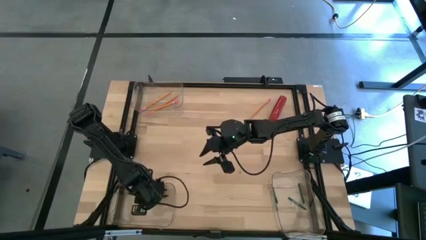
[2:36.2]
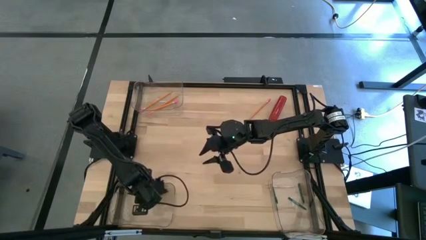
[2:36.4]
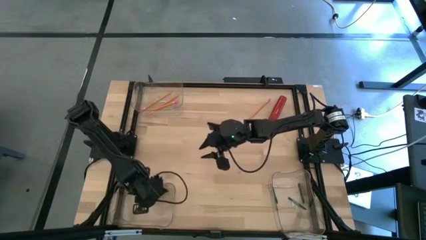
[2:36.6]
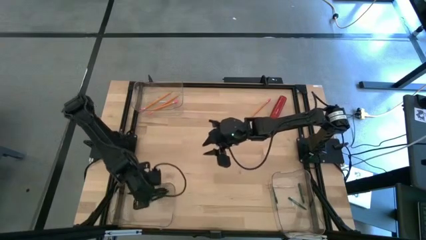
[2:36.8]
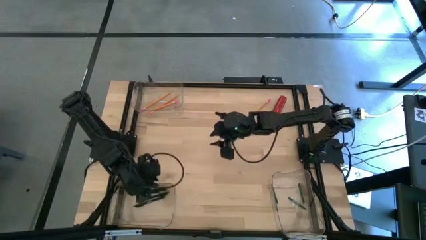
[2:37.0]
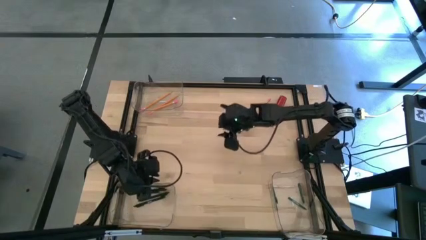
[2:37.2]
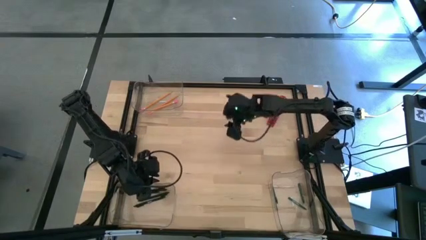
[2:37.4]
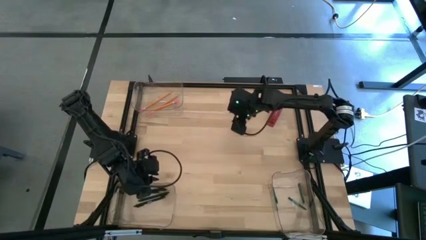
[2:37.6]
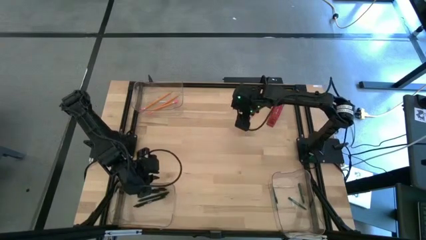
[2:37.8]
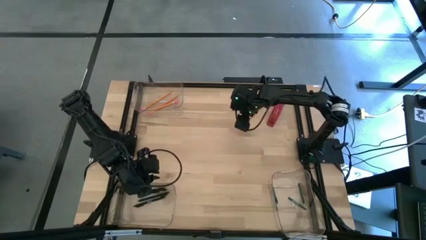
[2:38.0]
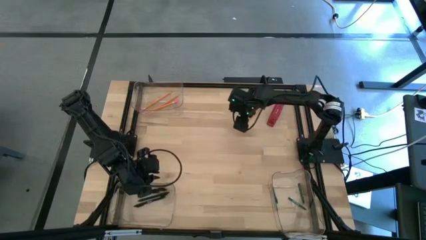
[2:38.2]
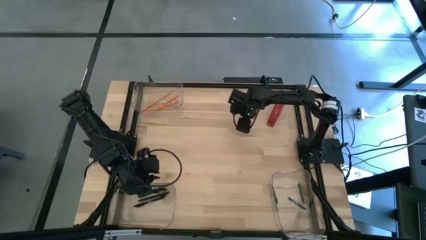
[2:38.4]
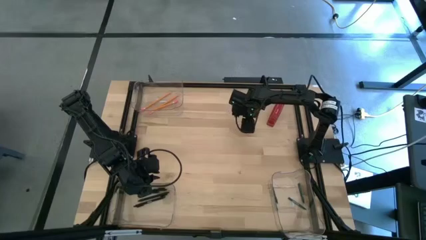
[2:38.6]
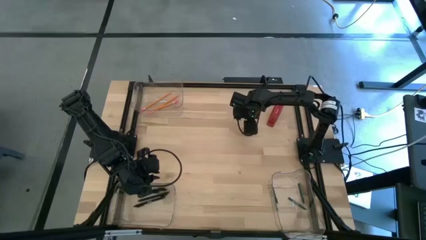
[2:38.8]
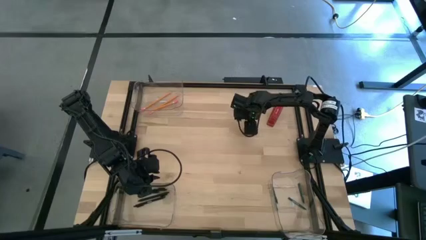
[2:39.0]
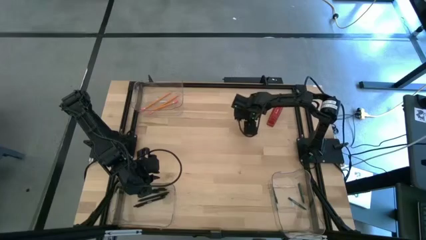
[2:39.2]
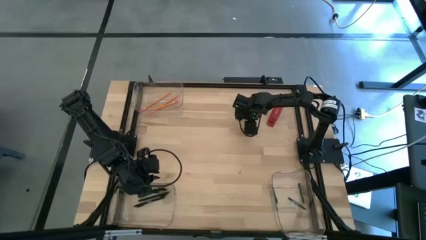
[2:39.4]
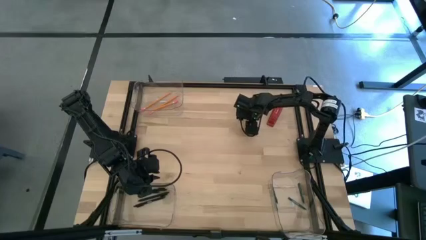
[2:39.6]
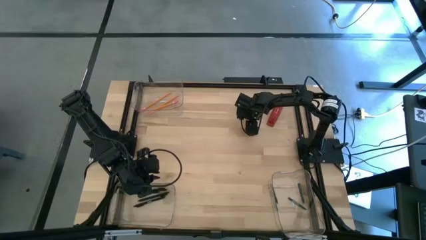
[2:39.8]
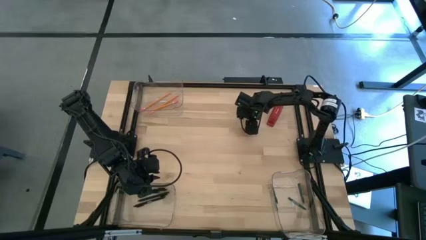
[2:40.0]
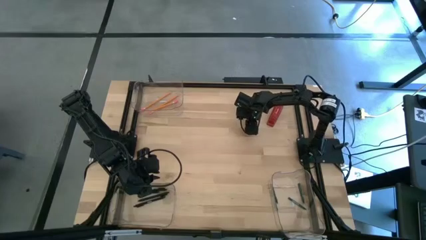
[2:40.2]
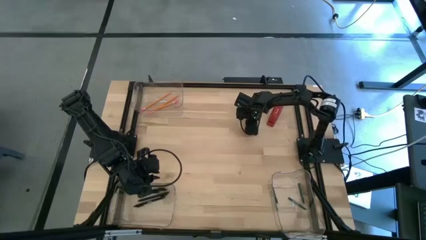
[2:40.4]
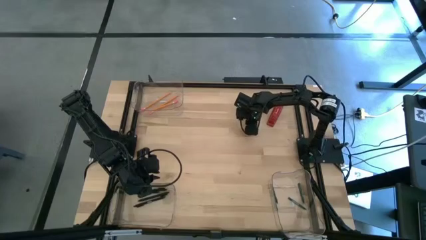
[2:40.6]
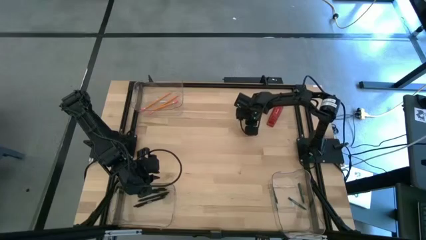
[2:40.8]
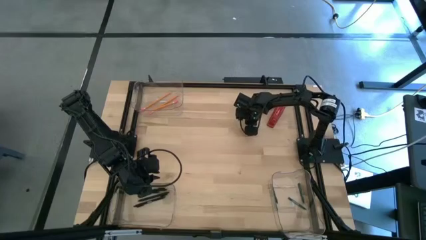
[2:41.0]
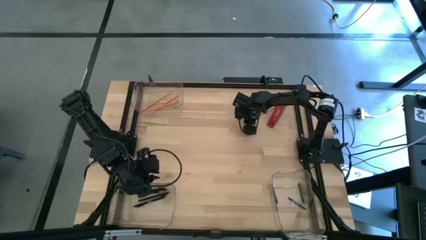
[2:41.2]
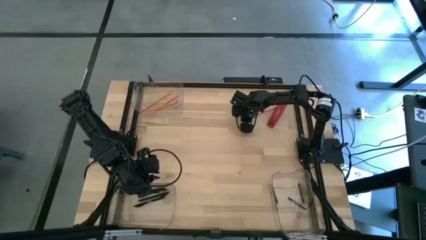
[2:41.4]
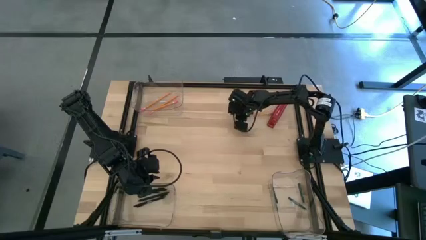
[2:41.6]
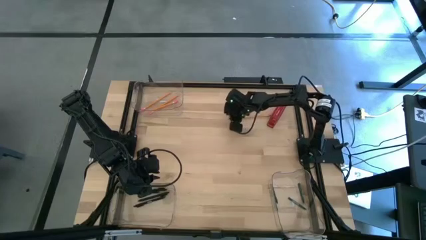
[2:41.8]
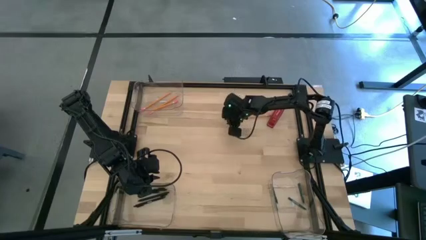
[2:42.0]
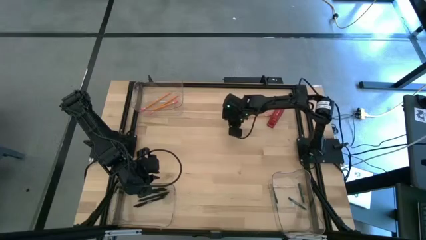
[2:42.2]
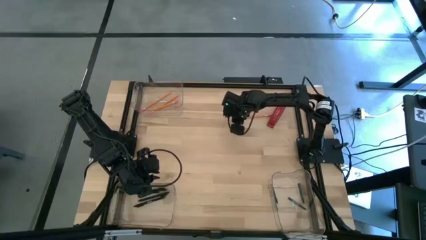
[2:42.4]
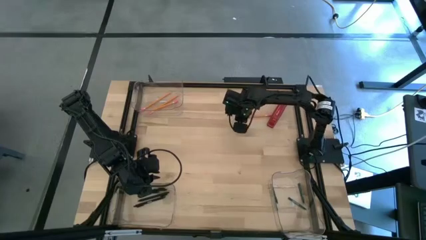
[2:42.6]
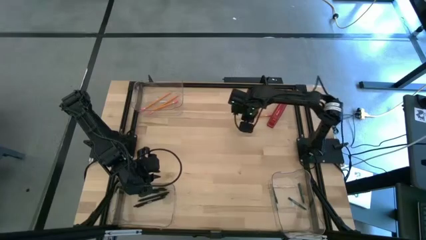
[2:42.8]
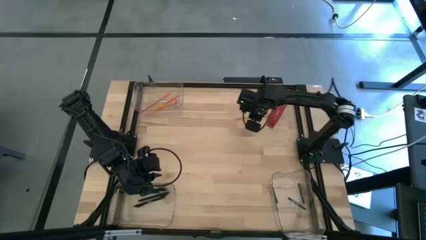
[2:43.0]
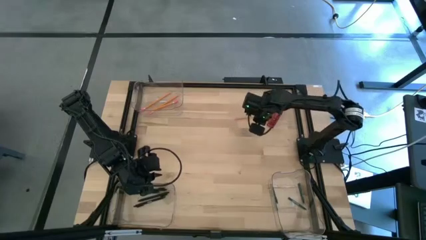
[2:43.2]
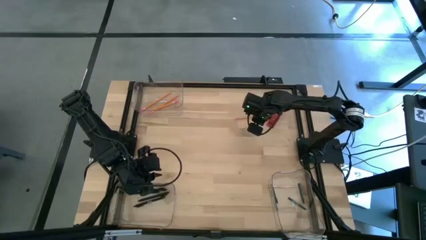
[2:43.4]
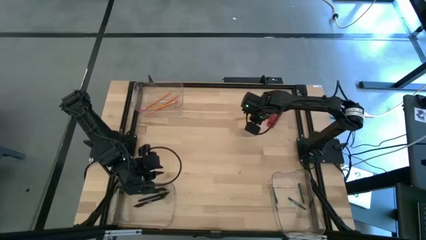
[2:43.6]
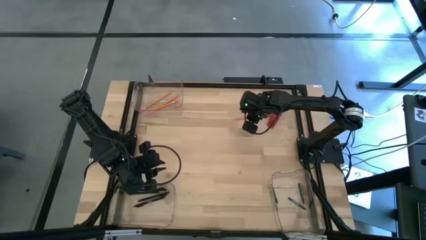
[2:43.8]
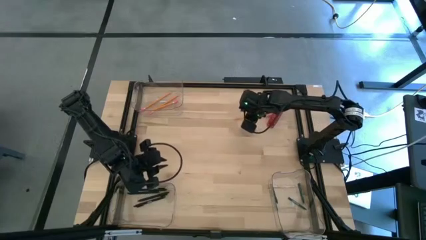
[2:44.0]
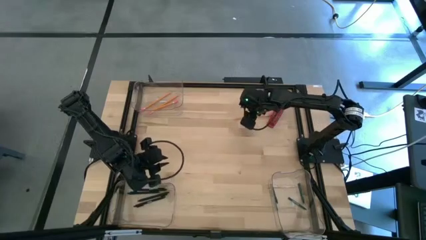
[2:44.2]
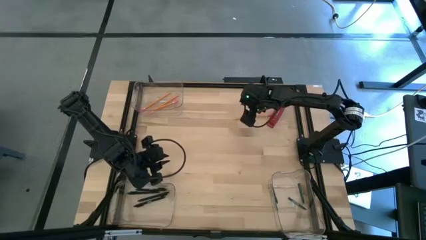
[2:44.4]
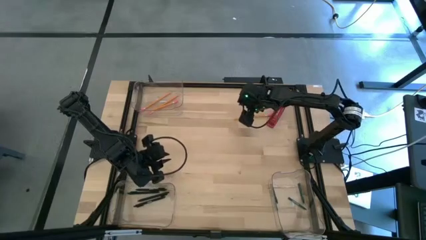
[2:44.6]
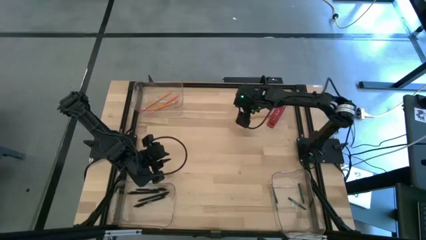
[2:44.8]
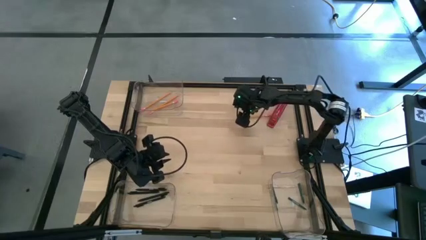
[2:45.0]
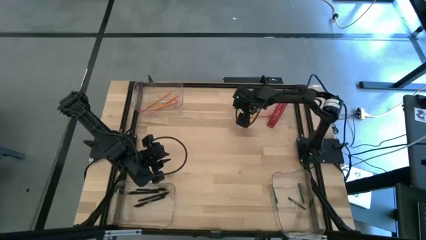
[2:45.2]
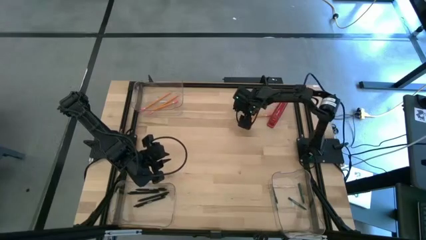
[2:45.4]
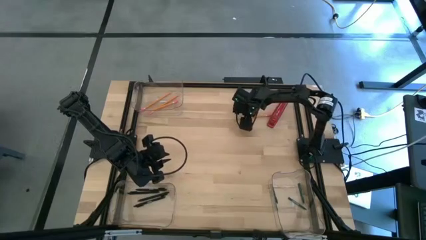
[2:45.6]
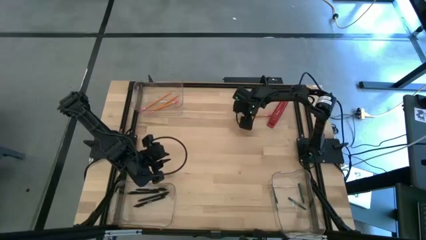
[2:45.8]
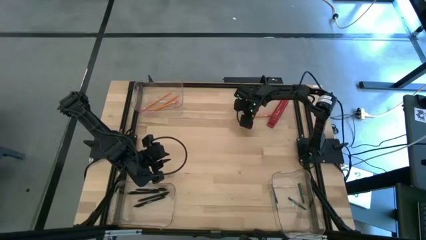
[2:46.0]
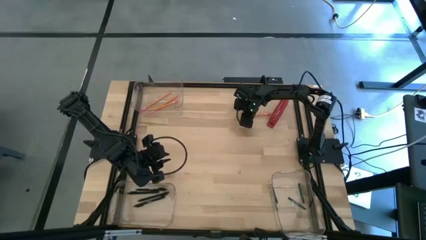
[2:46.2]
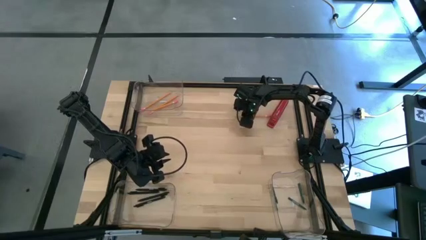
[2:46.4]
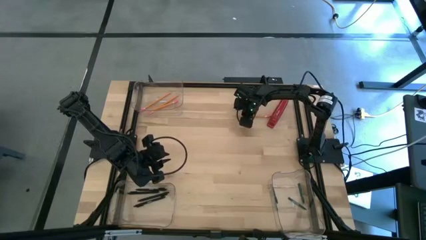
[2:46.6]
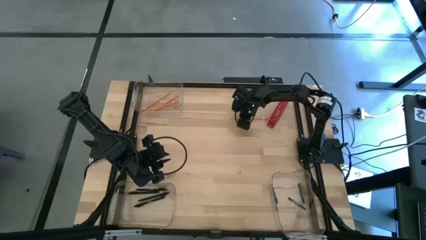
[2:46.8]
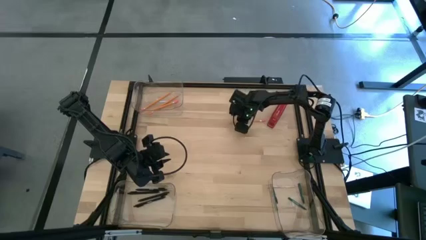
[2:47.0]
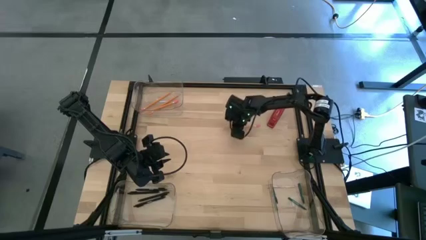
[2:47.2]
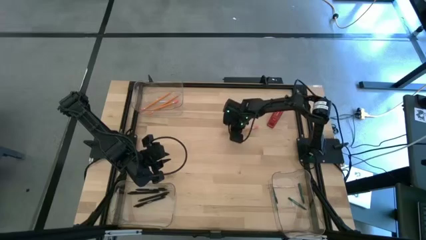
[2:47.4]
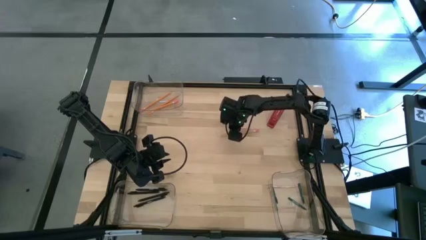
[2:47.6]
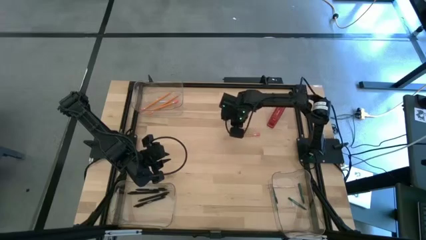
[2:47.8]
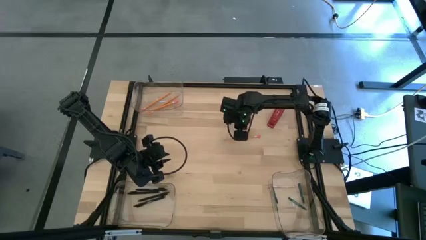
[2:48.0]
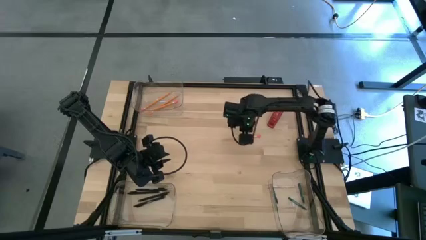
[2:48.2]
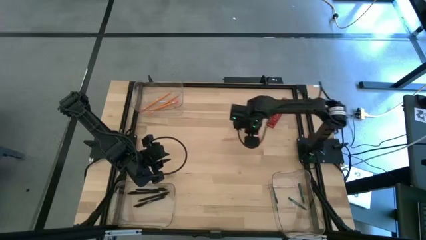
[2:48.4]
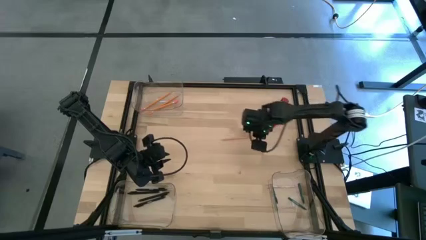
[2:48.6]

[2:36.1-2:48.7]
Task: Sort crayons/erasers/pens/pencils in bins
Put the orange pencil into the top transparent bin

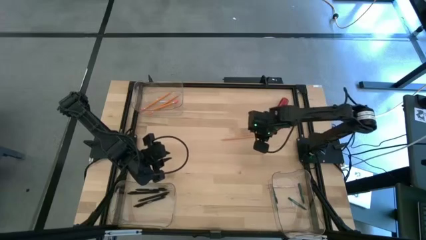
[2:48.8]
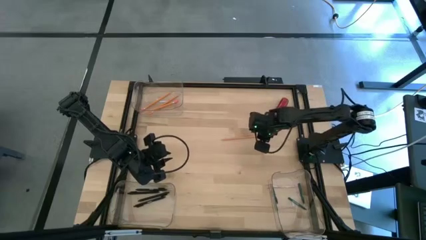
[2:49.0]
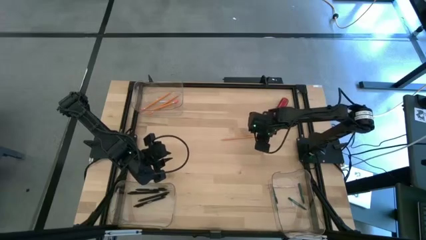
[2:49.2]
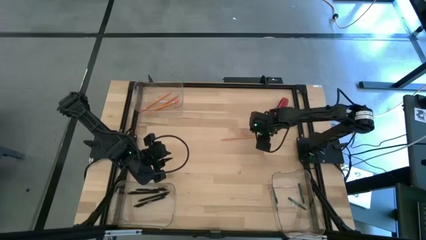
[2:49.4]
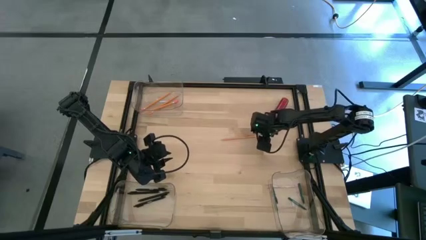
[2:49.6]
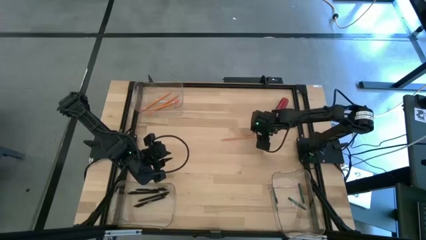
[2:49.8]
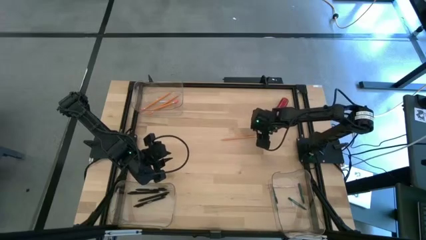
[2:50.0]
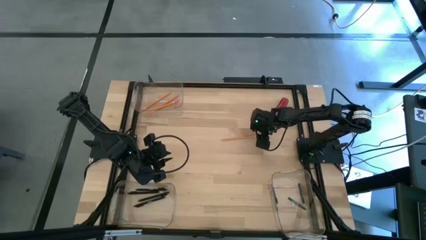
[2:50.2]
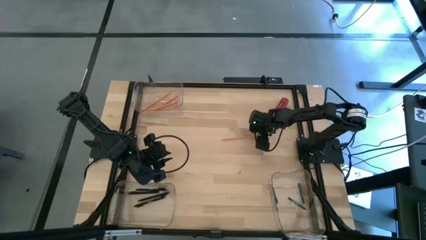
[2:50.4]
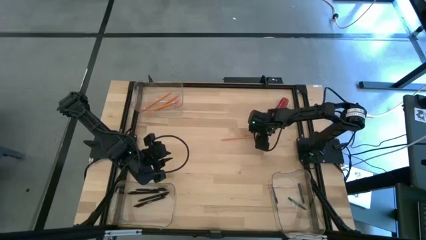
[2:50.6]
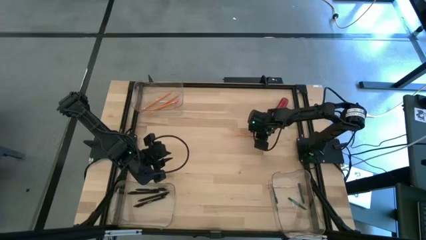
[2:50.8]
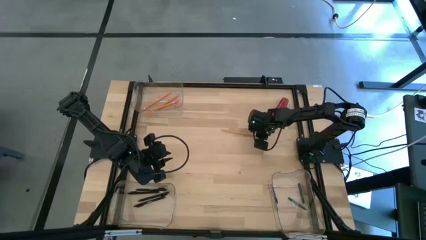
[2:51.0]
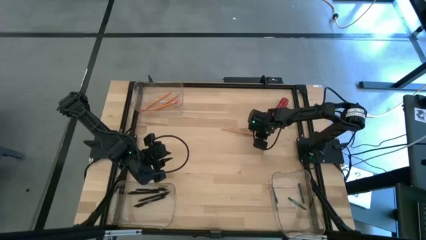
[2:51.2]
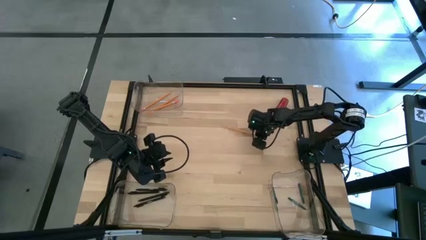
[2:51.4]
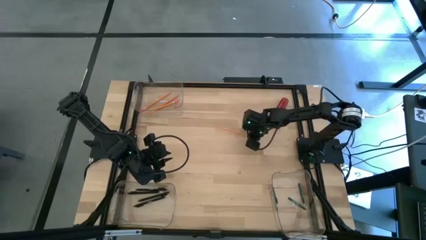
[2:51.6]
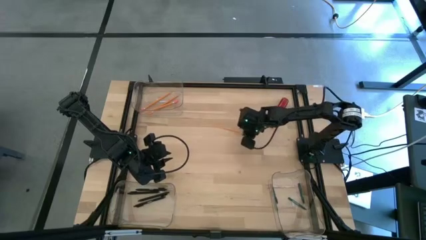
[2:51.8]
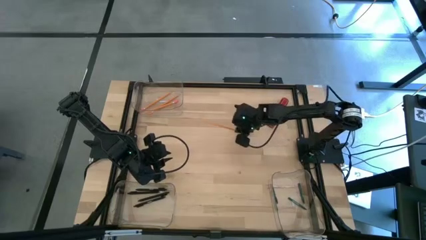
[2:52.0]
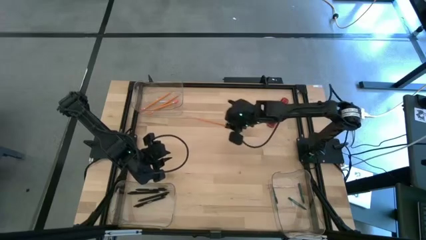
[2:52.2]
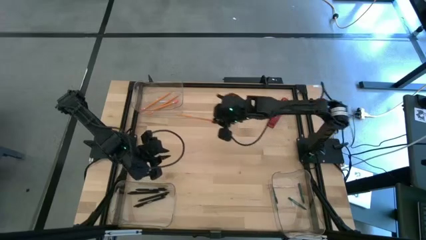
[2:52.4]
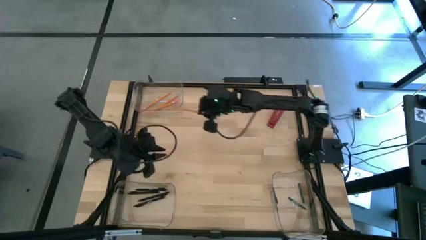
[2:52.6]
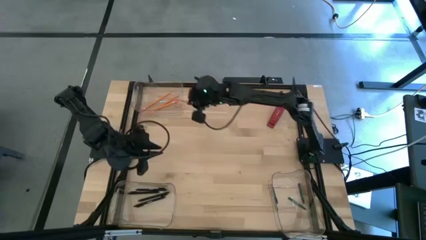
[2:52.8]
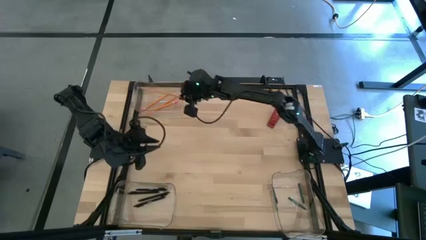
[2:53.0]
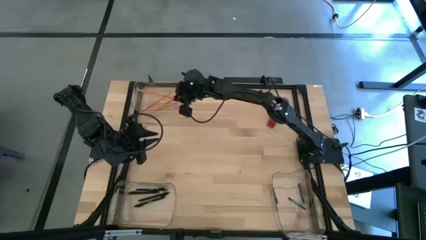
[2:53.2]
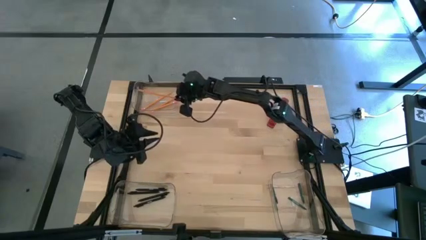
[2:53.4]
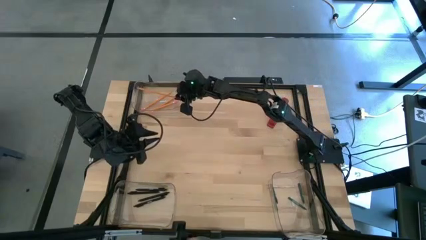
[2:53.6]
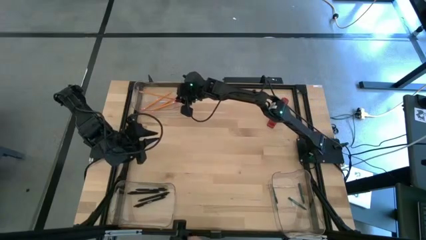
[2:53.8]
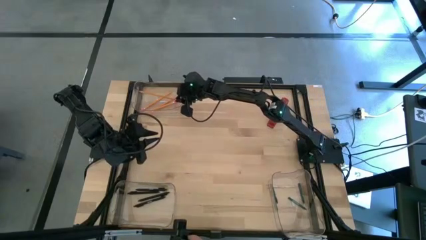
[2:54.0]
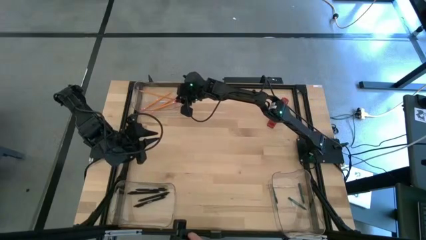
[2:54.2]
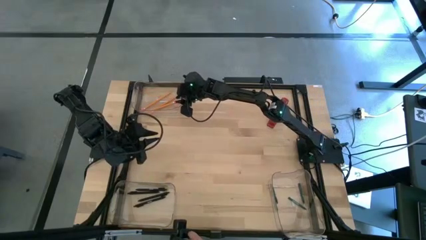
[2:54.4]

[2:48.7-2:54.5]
Put the orange pencil into the top transparent bin
